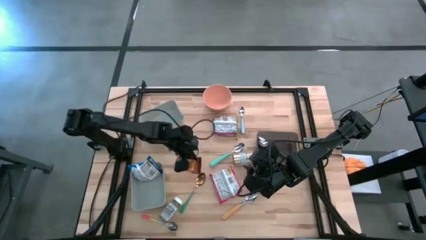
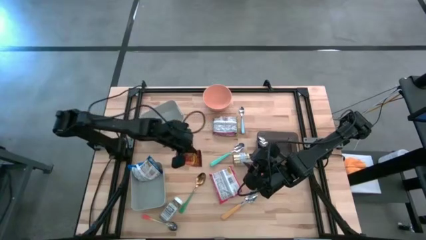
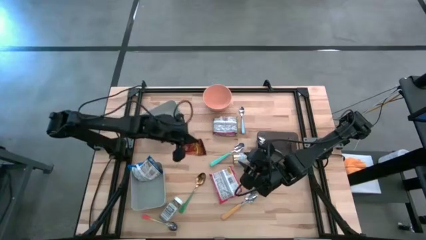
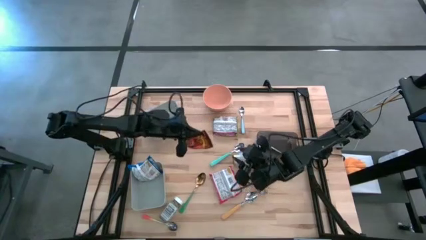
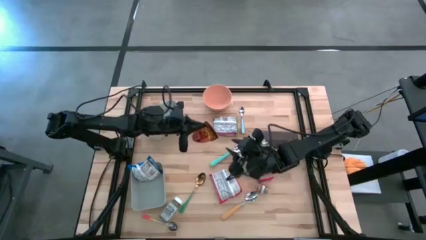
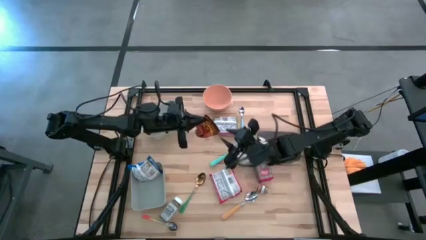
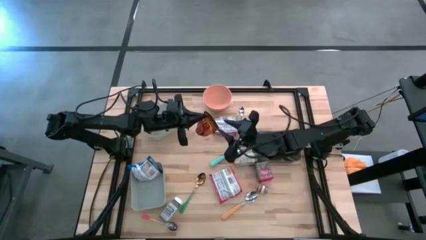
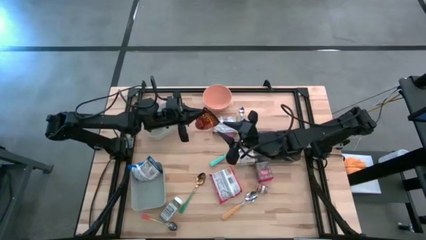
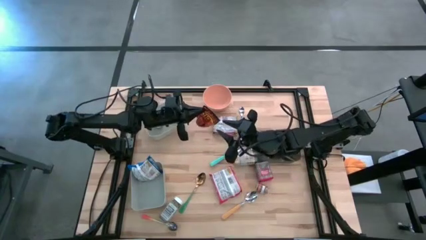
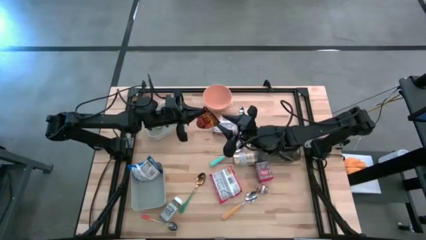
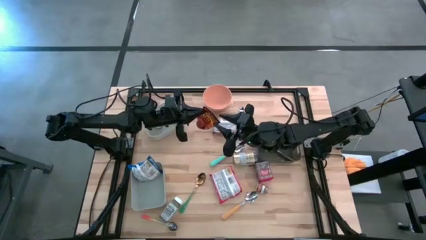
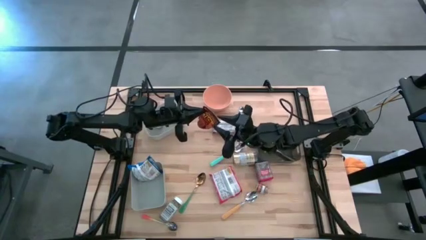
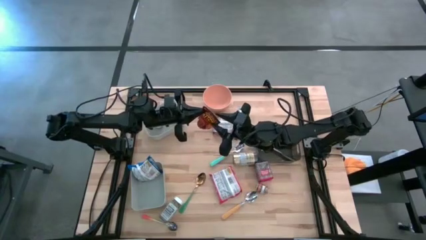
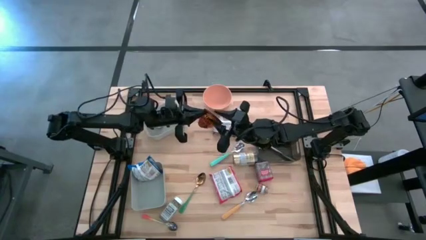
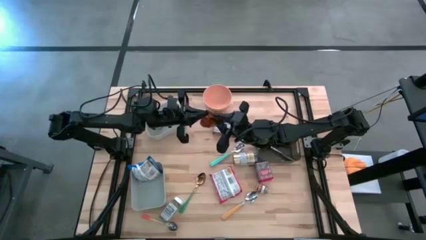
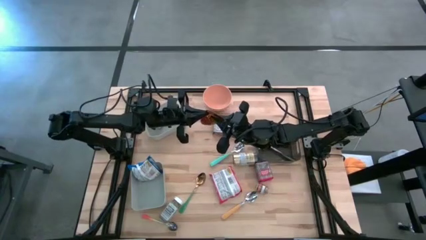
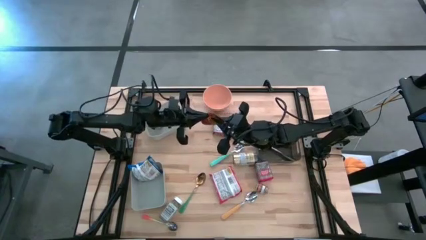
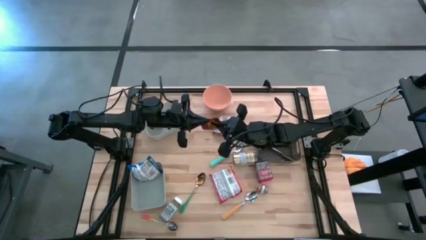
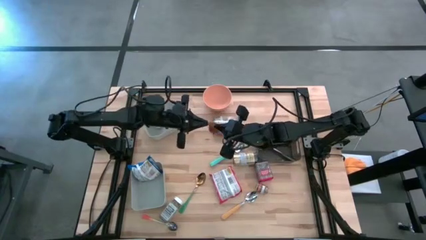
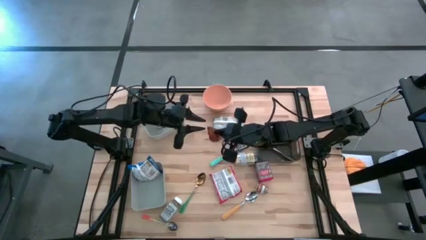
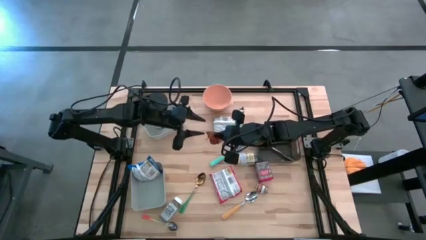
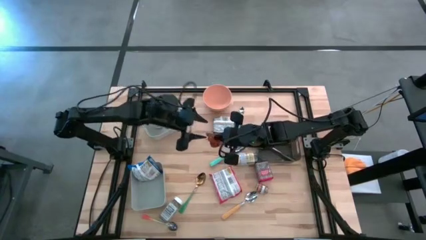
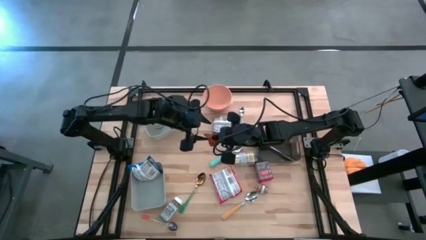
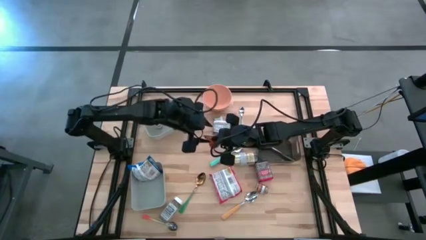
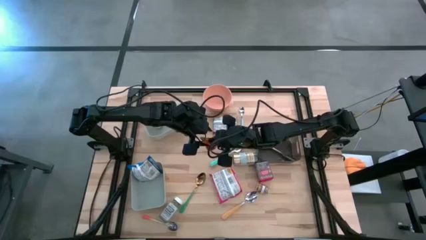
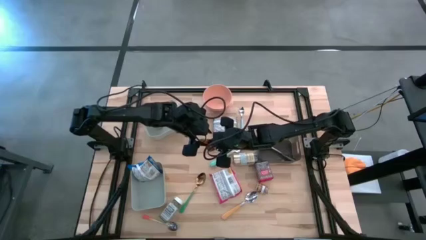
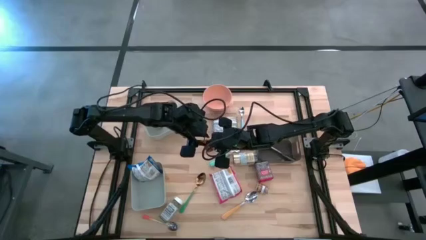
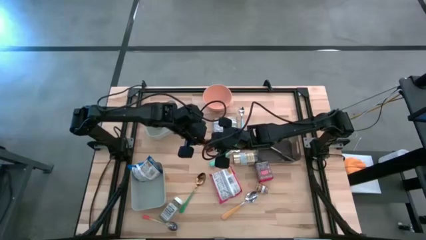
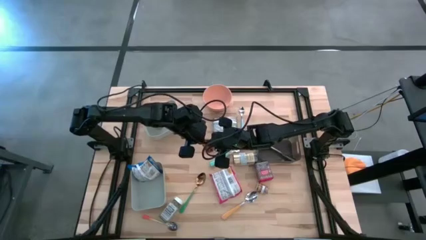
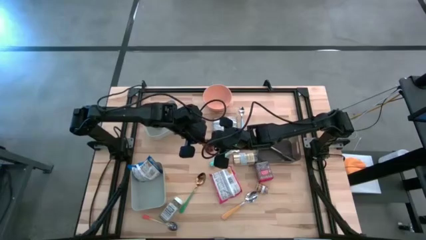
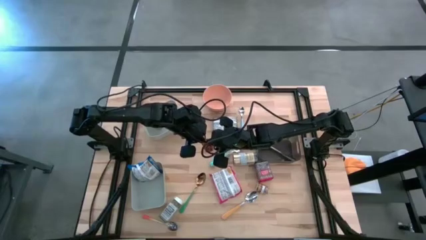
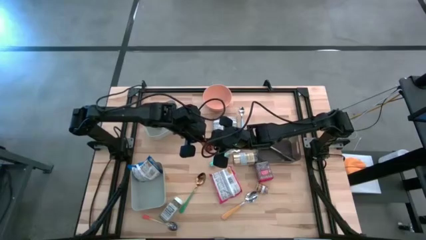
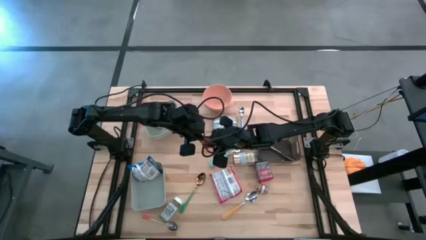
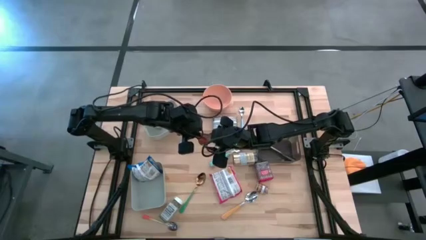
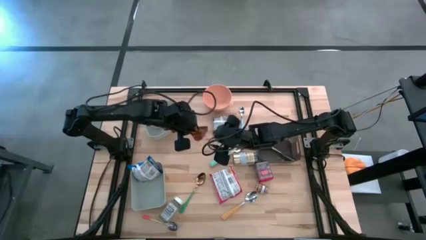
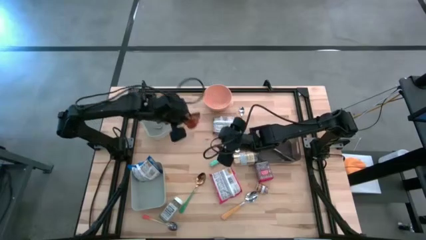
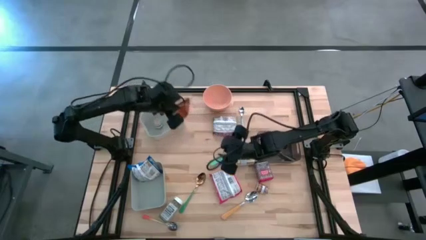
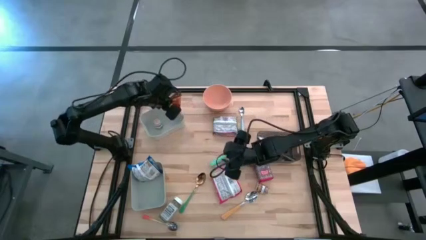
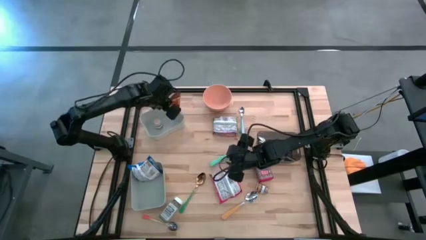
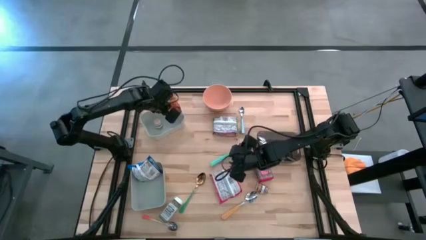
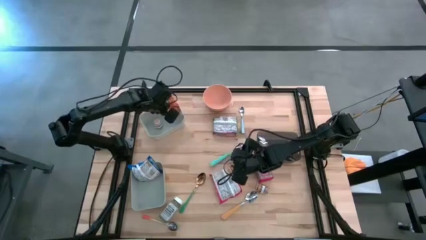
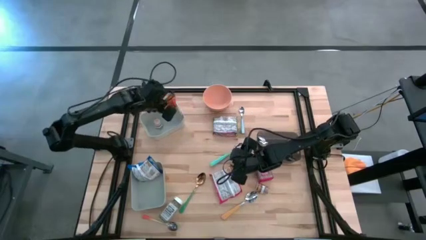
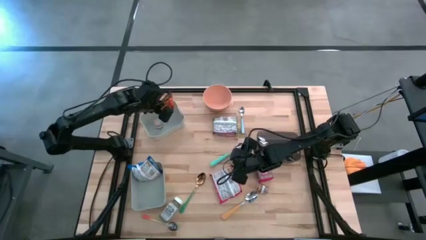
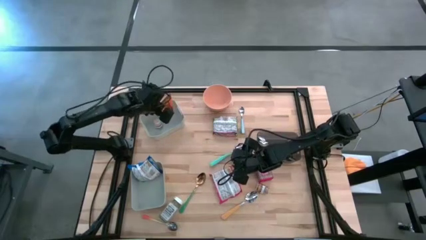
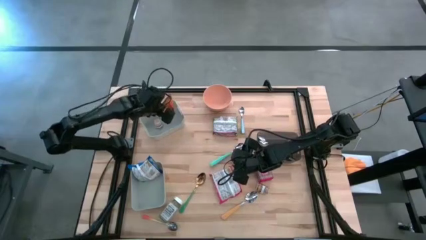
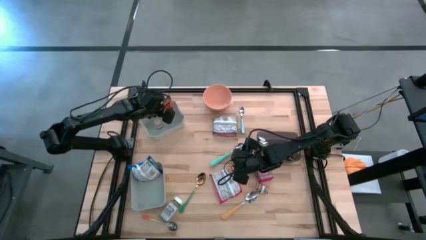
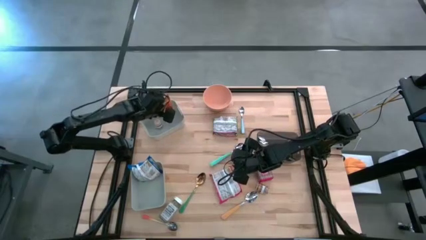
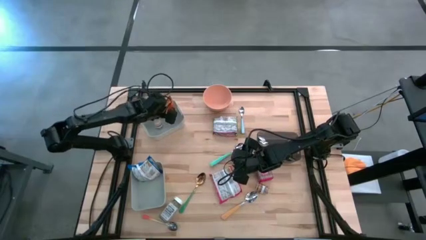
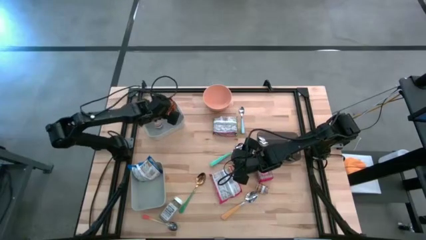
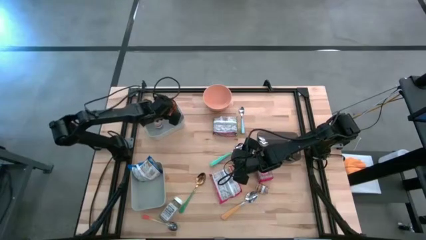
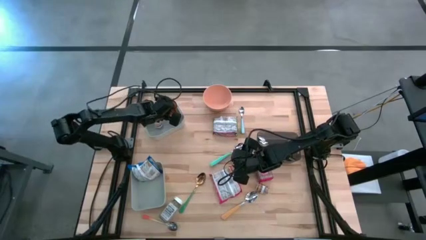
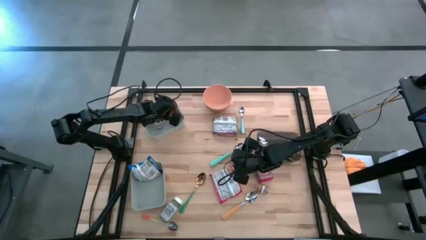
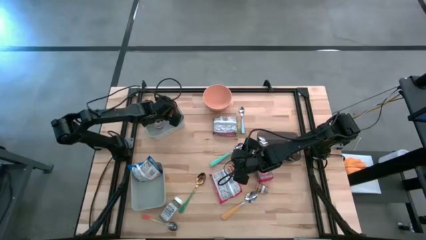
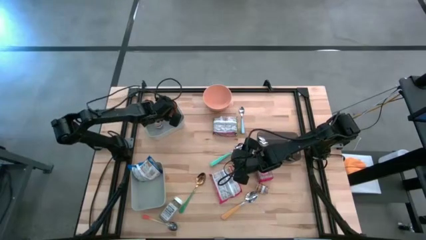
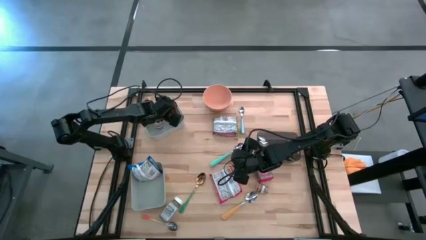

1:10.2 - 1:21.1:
Put the orange seasoning pack into the top gray bin

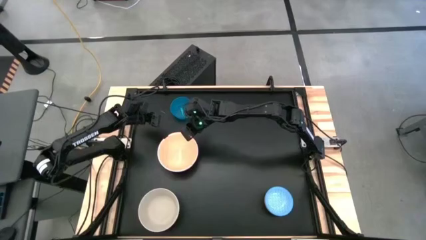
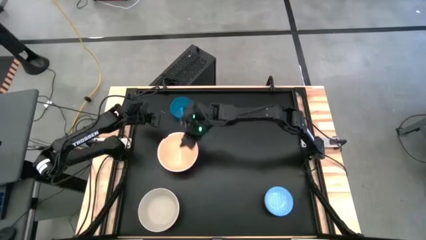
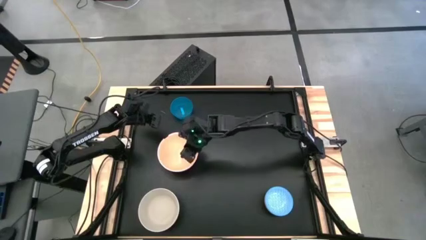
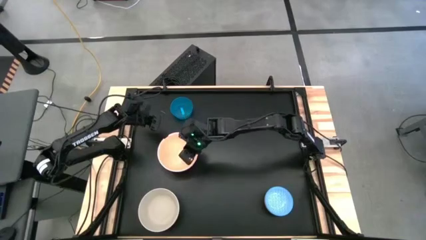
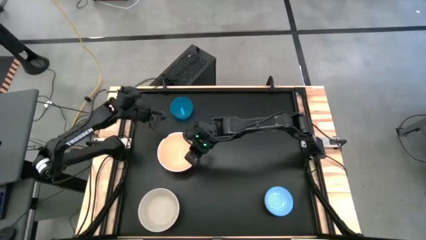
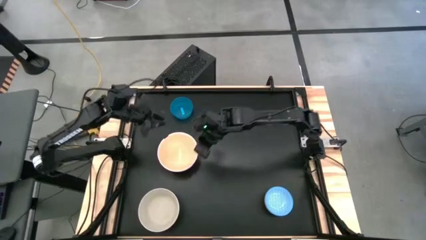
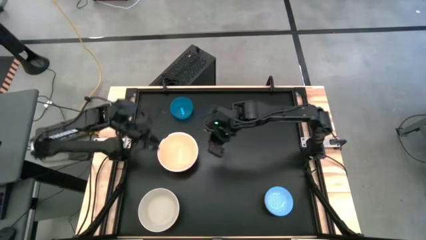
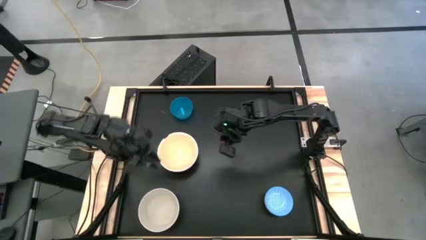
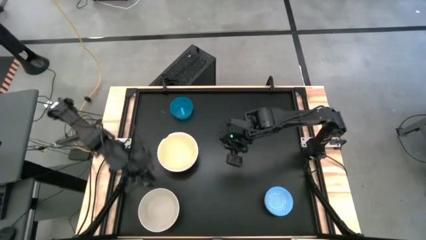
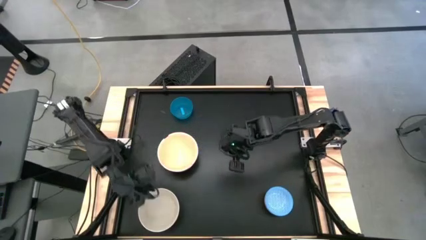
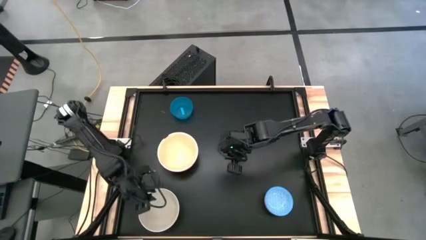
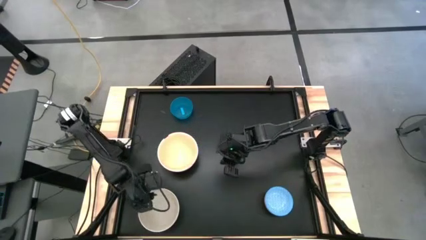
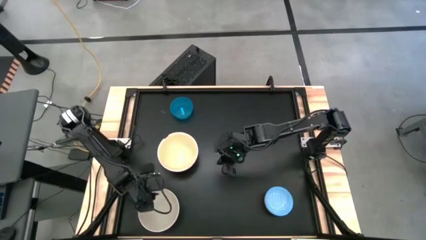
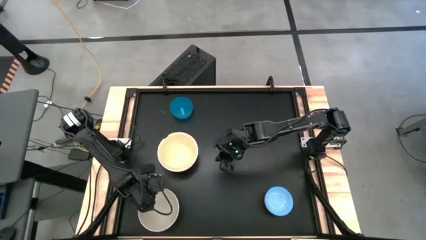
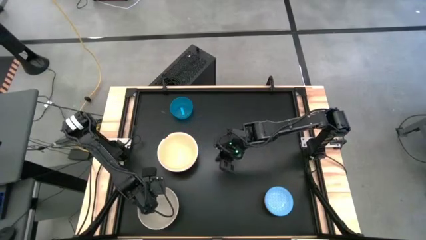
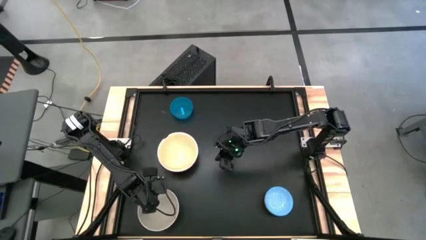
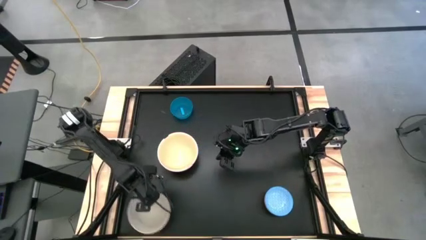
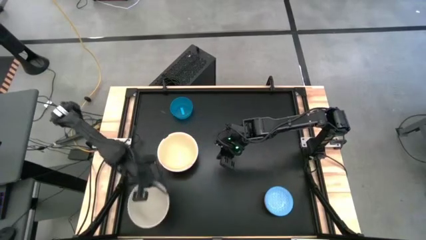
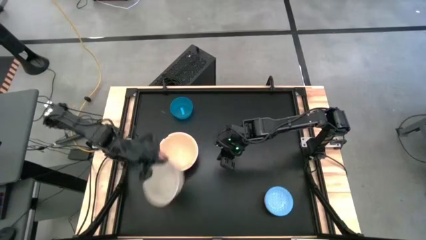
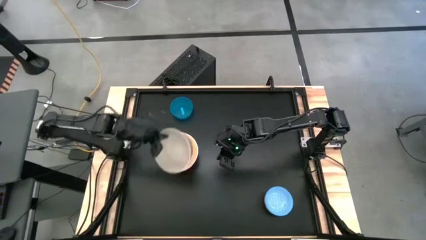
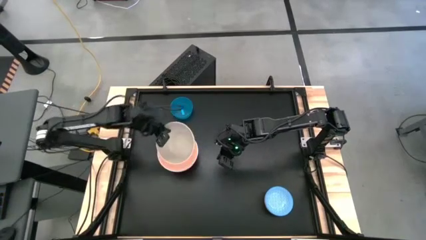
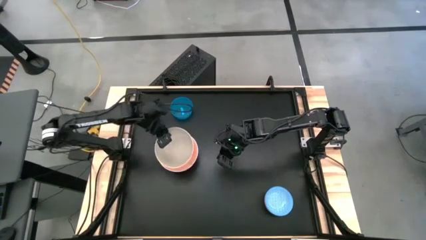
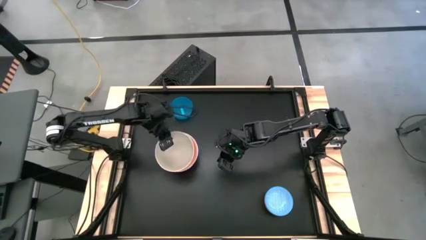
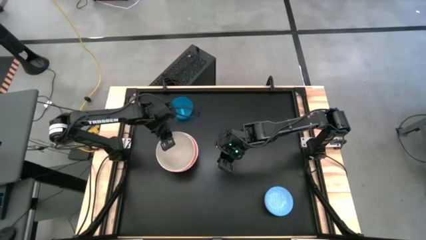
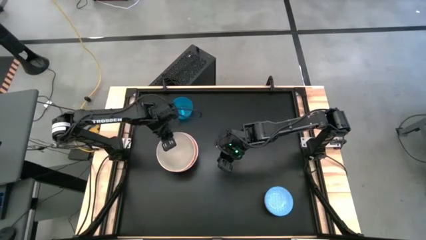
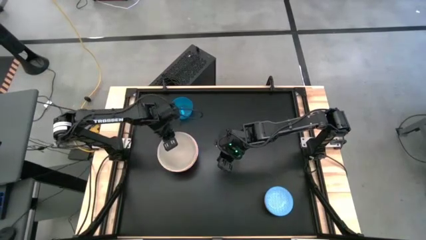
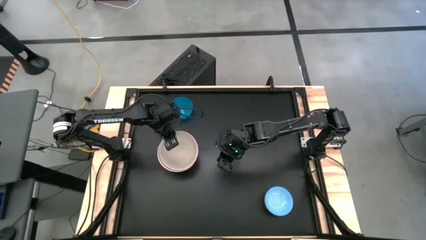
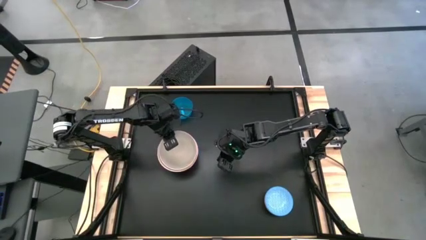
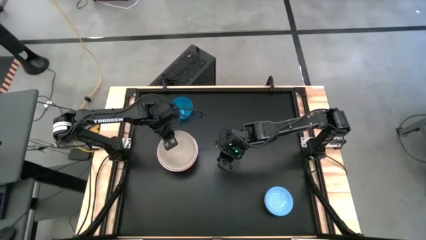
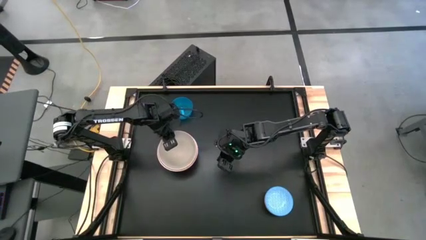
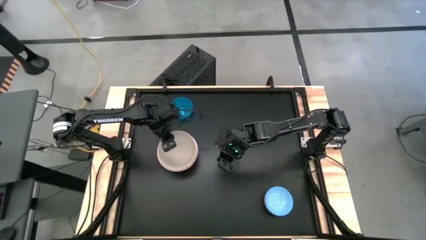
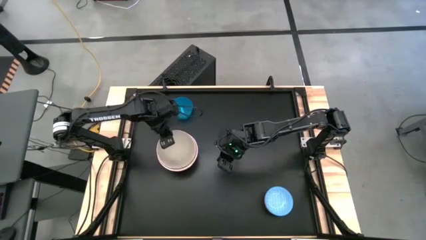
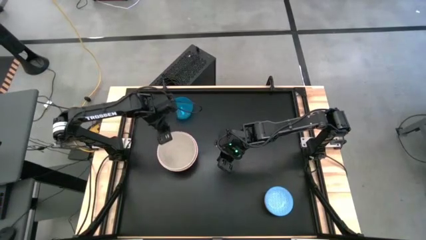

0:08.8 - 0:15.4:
Stack the gray bowl on top of the light pink bowl
